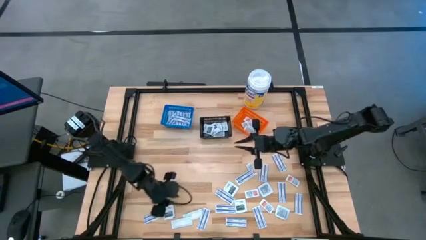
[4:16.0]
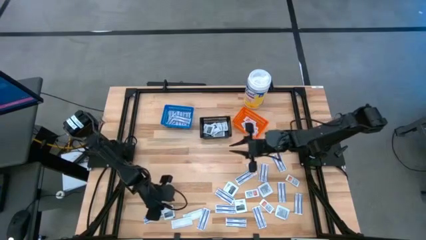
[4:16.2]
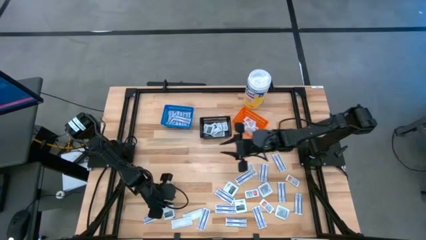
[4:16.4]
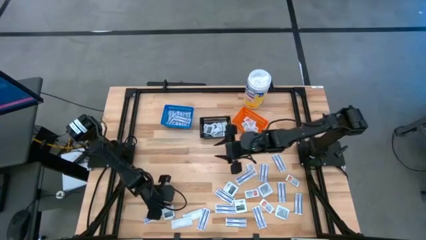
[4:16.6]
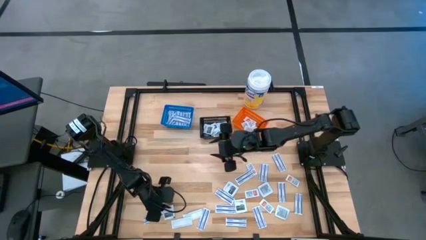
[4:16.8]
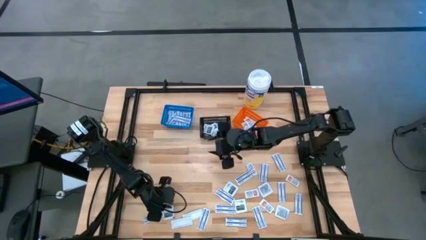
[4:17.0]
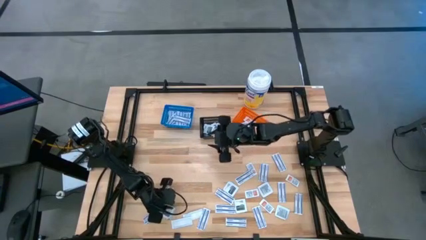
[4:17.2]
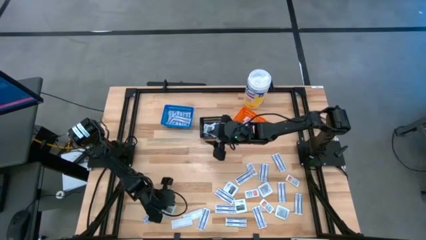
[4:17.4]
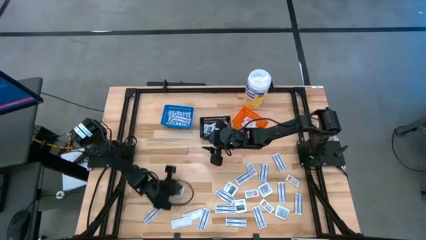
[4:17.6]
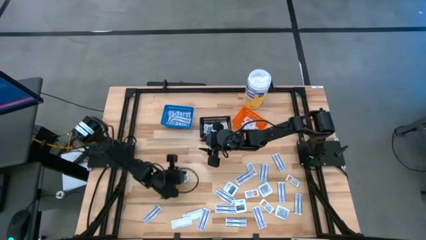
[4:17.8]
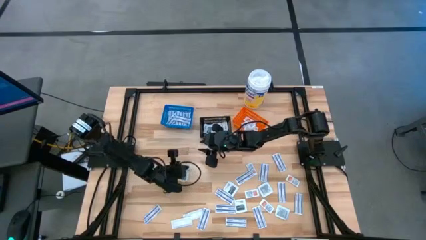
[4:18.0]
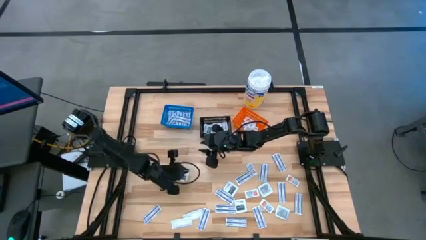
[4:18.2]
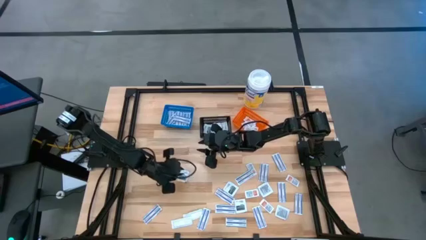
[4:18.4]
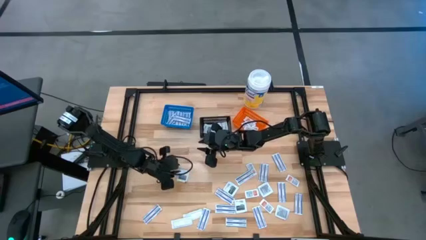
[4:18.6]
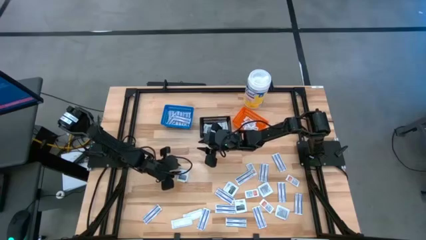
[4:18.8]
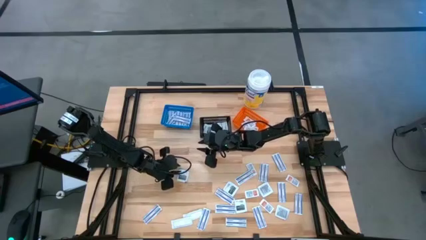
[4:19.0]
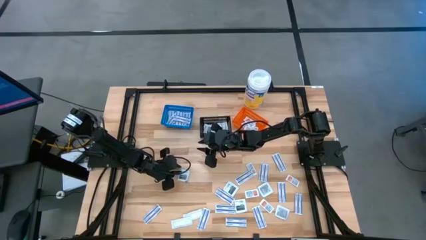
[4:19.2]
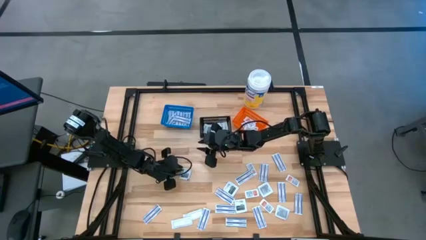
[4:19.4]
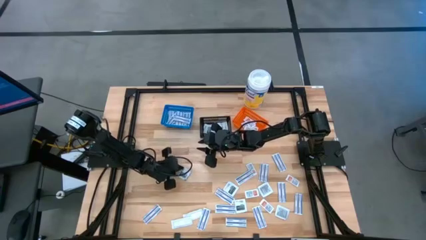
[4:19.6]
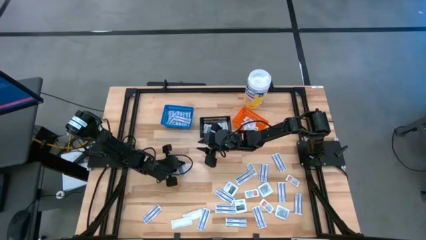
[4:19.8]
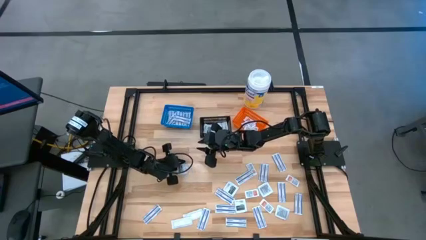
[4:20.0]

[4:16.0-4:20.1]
Task: Pick & Place First Aid Supplies
Put the towelette pack into the black bin

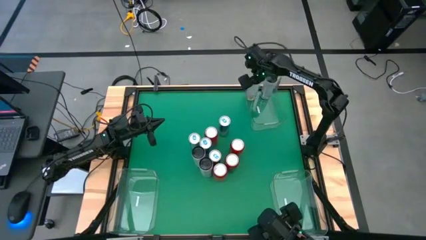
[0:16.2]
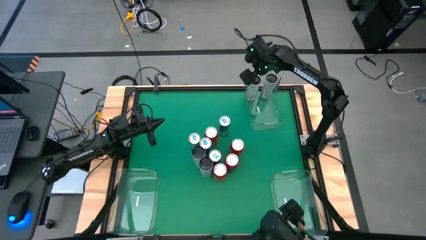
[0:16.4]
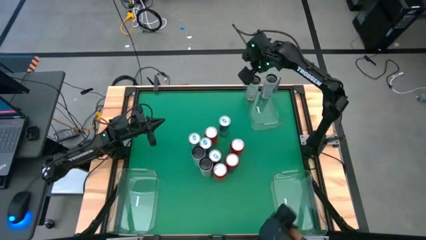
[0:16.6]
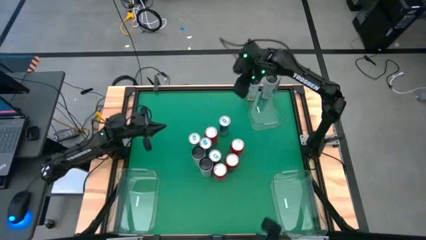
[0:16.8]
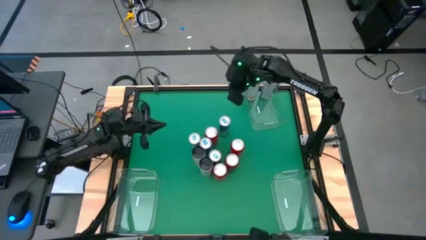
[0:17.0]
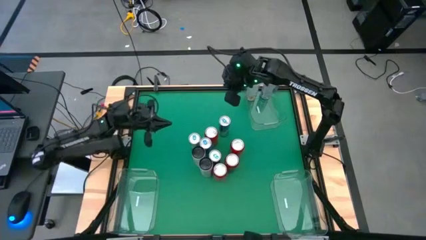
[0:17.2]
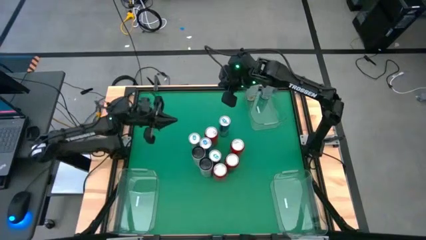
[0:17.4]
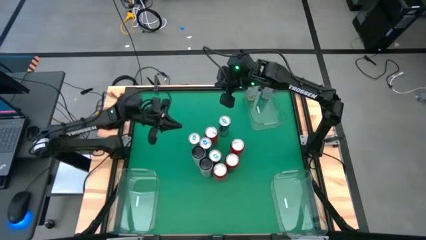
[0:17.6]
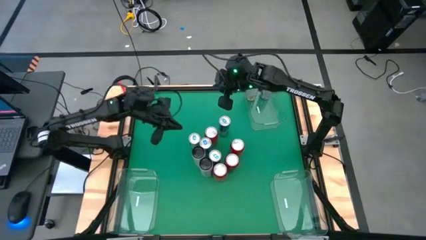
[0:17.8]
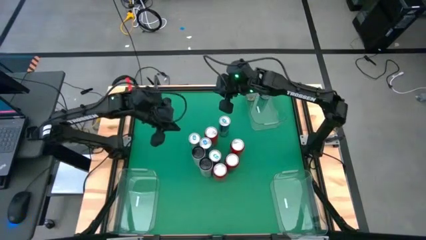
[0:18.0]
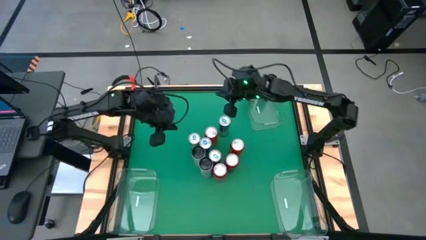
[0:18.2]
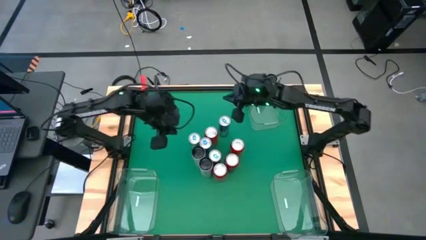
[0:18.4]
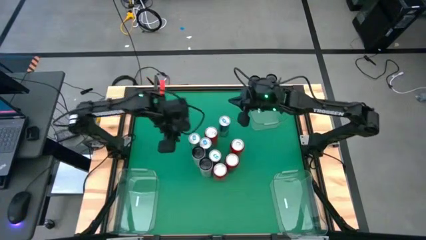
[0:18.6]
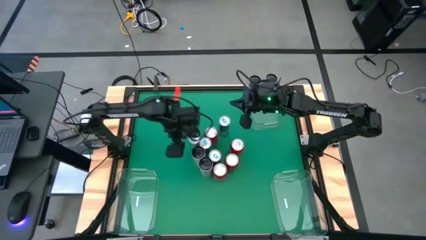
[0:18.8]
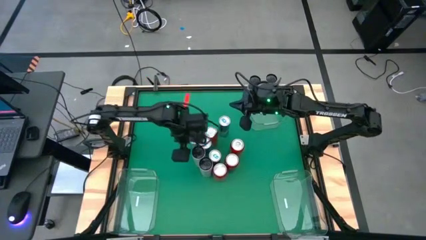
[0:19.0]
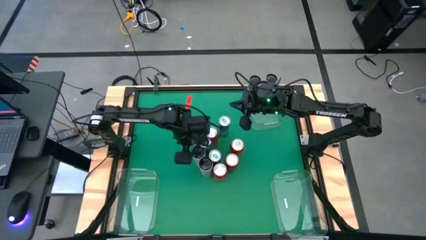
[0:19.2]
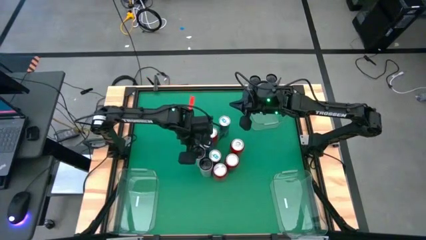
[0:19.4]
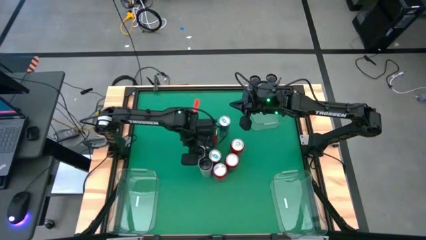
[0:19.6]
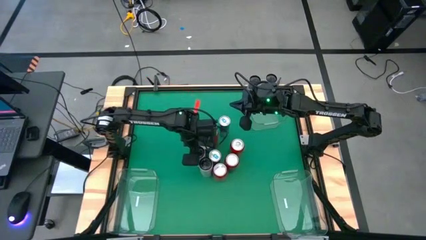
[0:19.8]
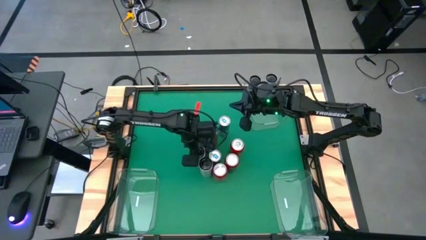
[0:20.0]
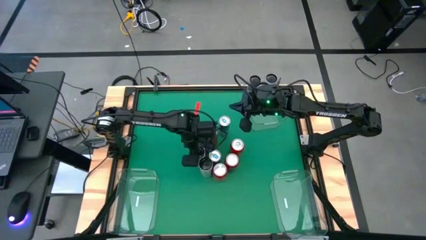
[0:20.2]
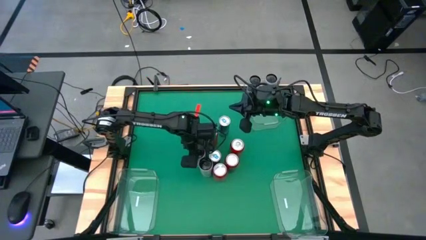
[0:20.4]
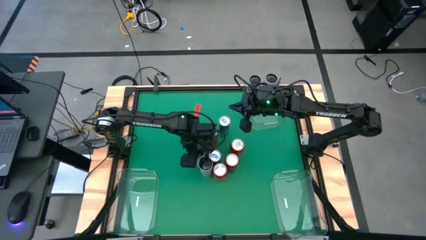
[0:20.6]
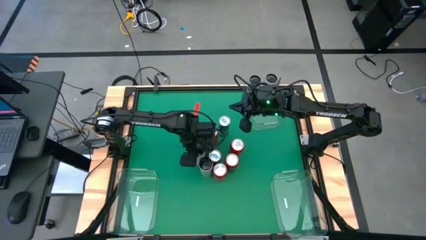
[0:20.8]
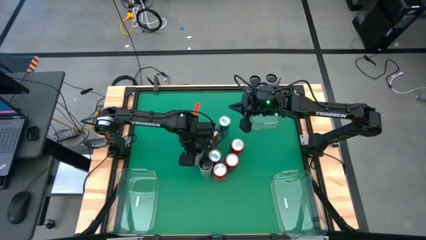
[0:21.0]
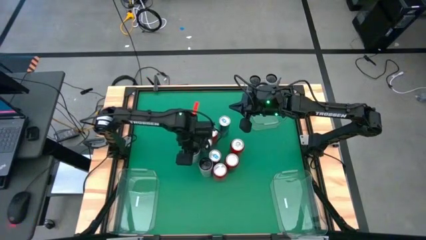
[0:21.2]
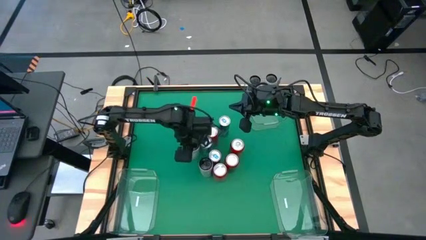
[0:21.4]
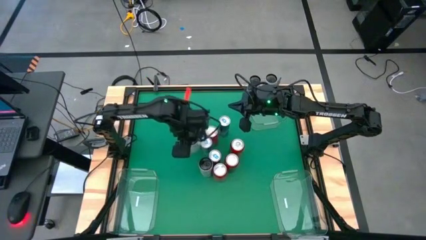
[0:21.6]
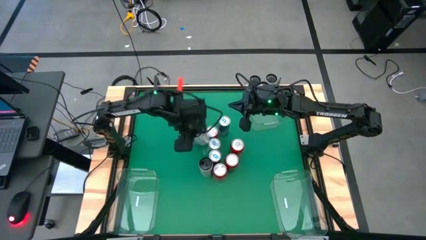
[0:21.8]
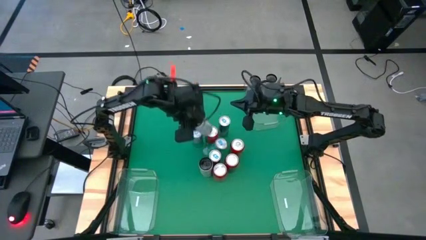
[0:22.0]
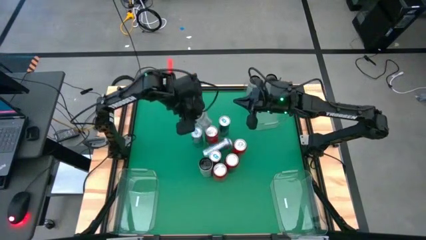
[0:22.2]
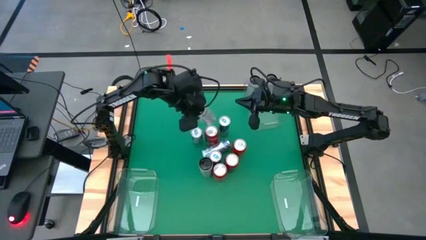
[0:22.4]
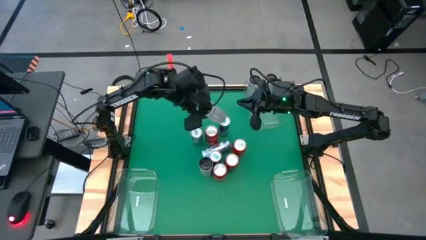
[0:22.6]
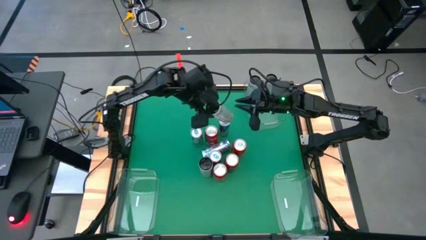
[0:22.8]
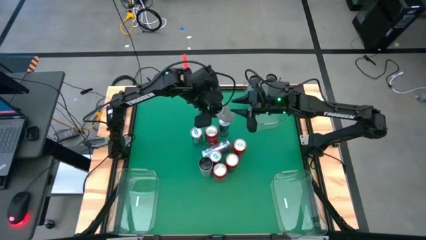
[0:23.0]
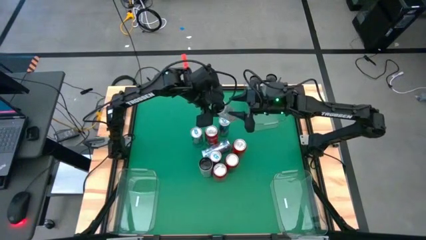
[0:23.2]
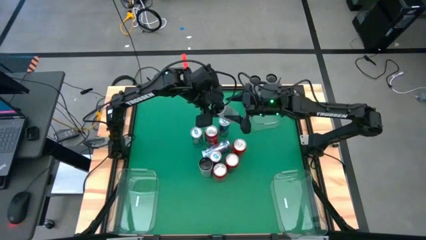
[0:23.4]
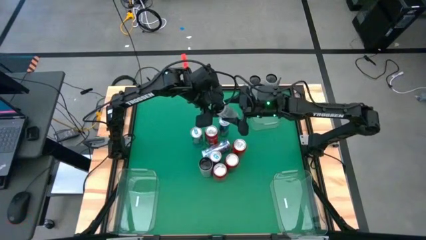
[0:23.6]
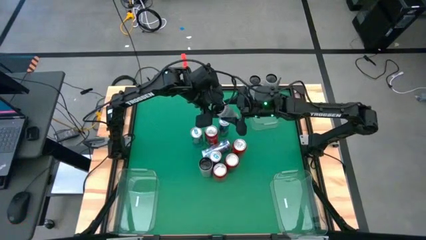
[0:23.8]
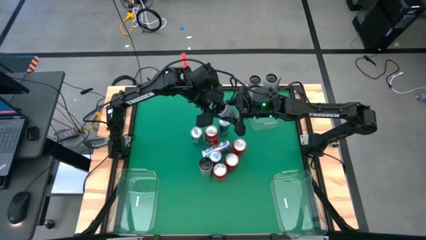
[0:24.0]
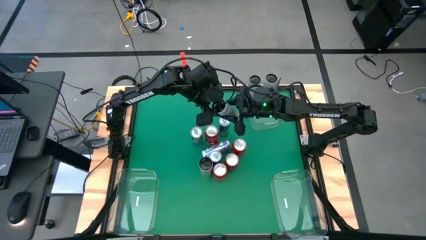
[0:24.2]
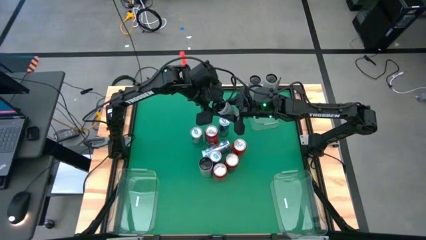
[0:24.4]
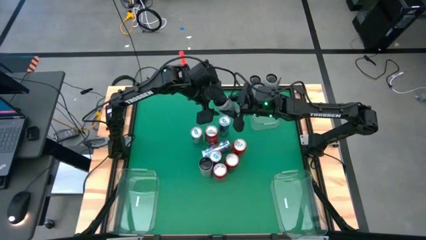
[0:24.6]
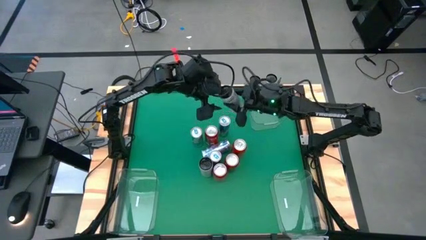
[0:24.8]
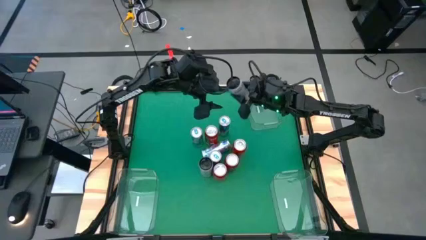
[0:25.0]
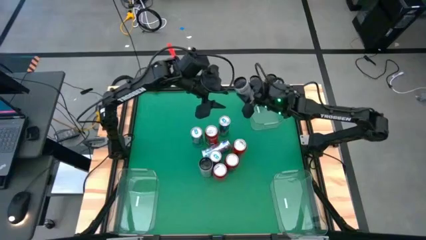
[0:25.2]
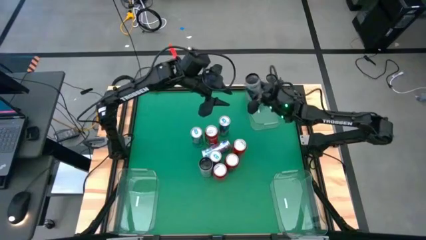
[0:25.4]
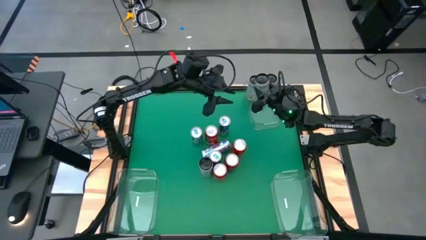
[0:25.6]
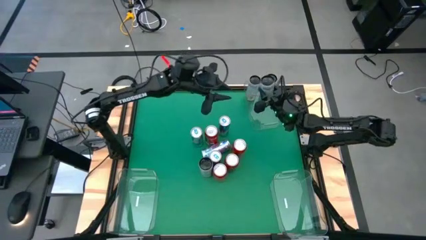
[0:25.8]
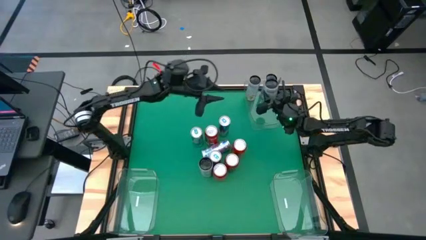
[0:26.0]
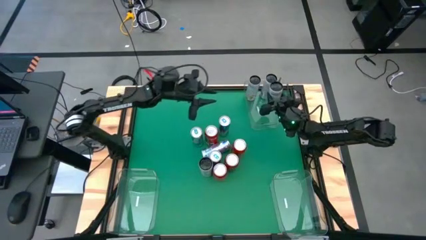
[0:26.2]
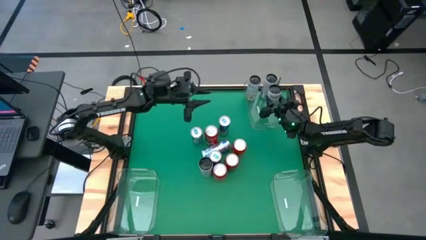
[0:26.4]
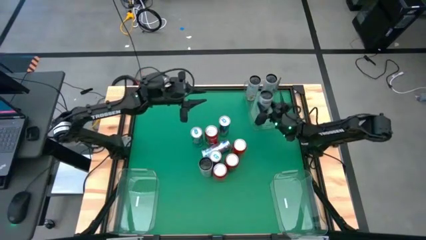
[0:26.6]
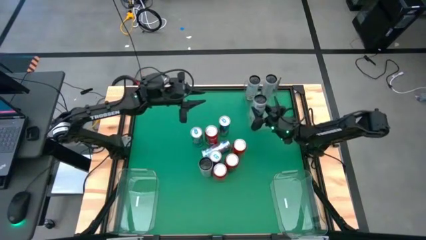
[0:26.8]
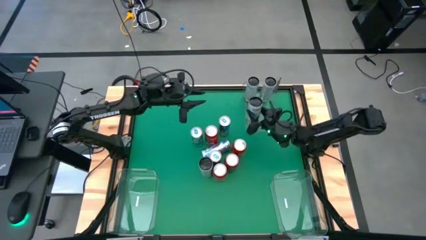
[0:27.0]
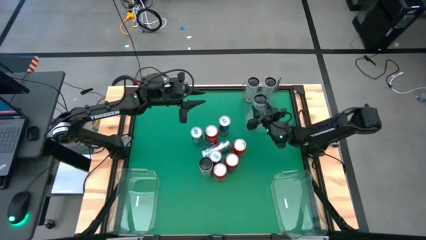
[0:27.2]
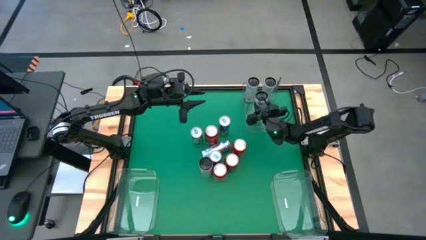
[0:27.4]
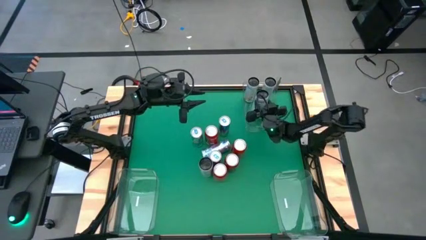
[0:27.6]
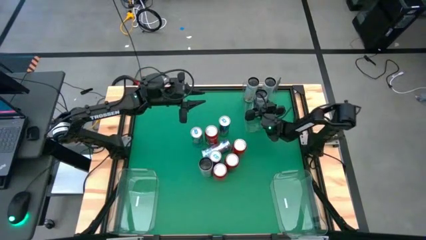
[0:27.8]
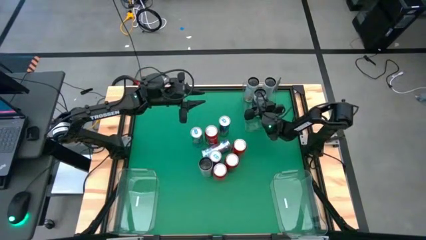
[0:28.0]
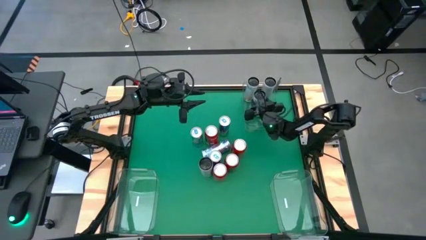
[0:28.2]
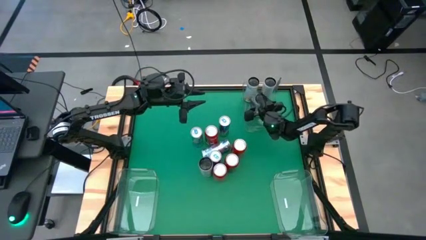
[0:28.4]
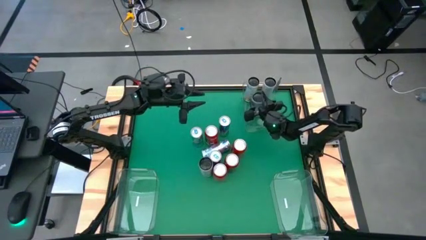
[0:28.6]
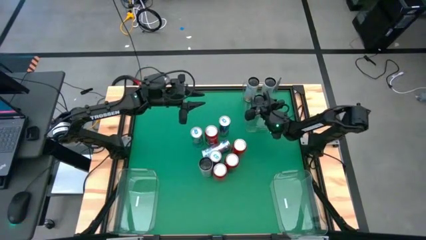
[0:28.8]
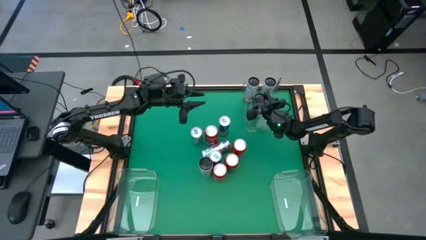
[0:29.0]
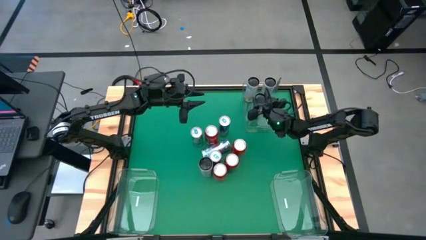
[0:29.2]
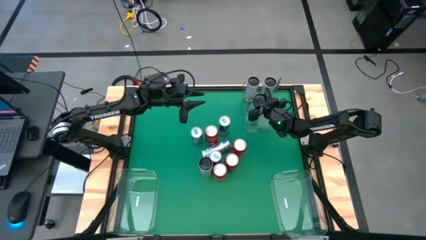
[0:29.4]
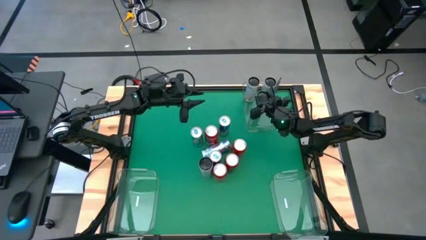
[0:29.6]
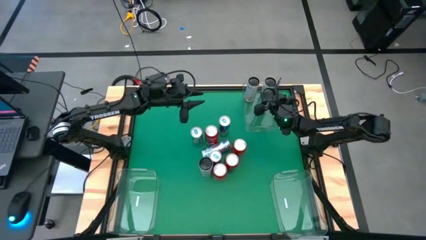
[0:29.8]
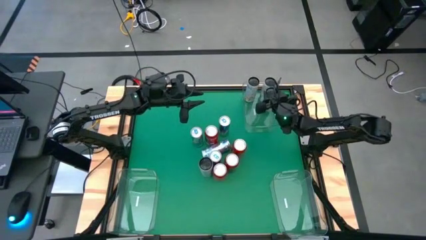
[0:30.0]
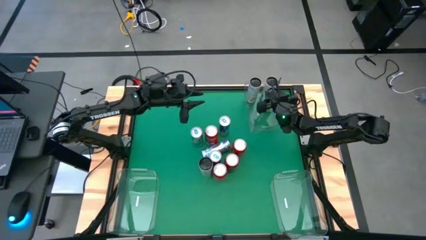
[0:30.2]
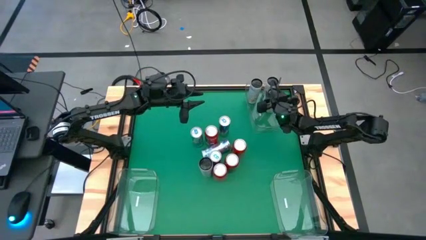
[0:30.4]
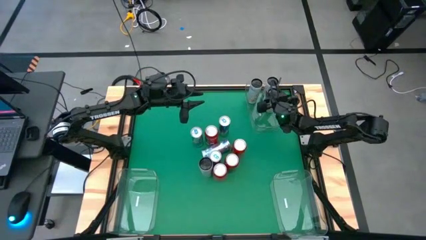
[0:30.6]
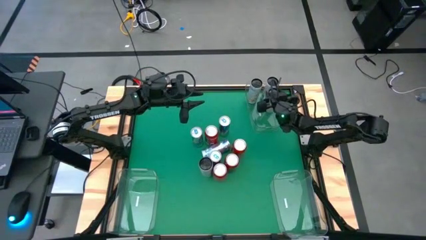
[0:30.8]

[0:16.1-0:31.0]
Task: Sort soda cans
Put the white and yellow soda can into the top transparent bin
